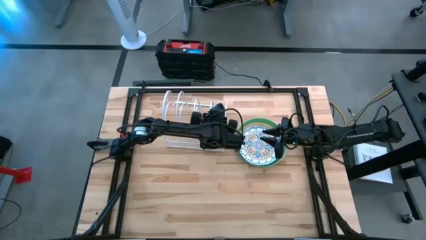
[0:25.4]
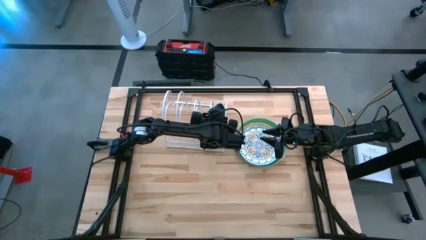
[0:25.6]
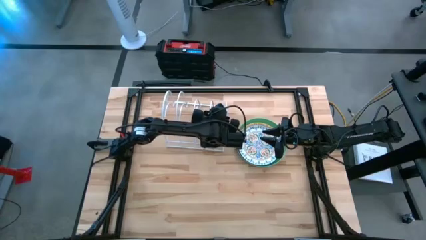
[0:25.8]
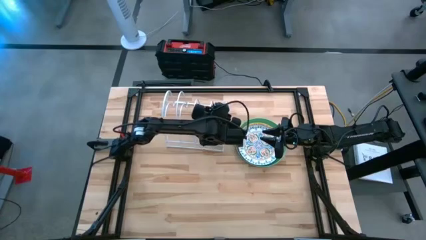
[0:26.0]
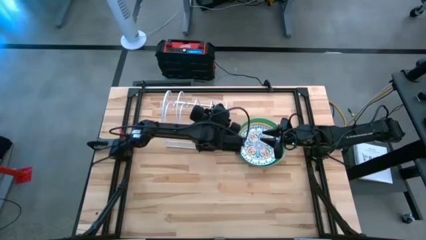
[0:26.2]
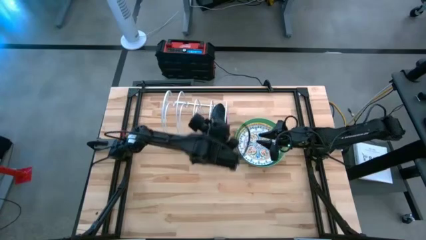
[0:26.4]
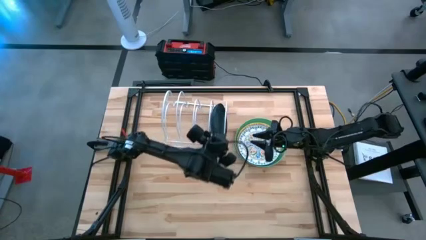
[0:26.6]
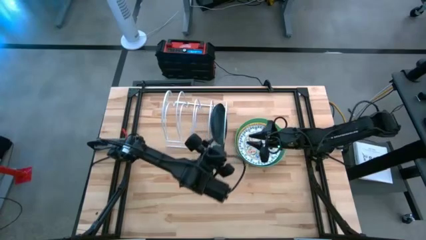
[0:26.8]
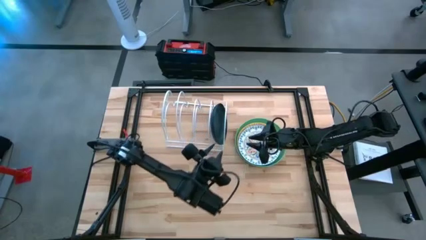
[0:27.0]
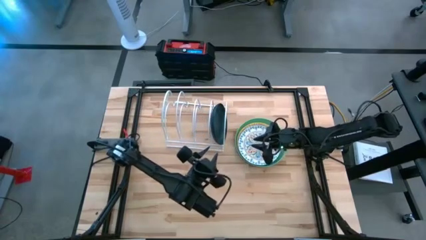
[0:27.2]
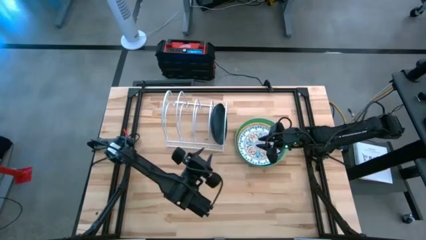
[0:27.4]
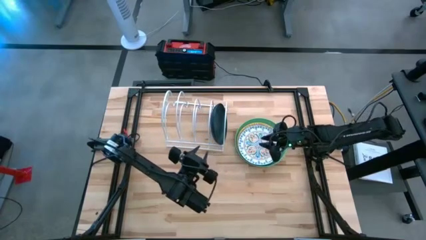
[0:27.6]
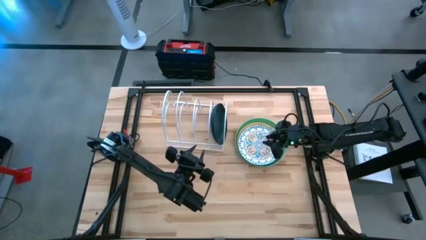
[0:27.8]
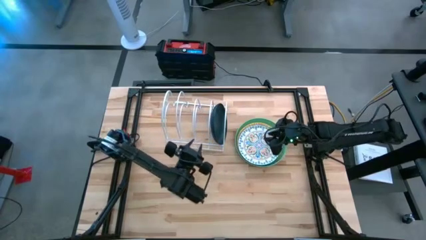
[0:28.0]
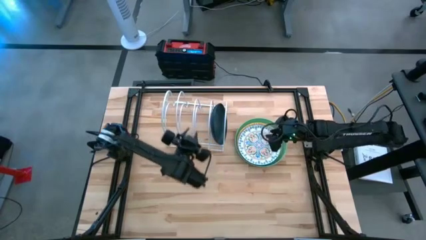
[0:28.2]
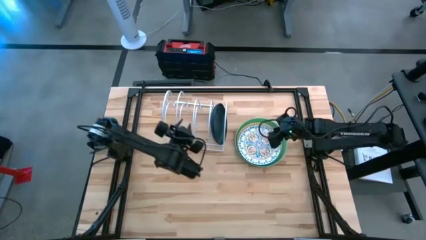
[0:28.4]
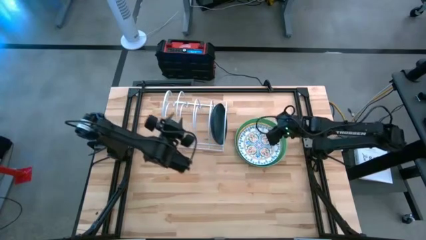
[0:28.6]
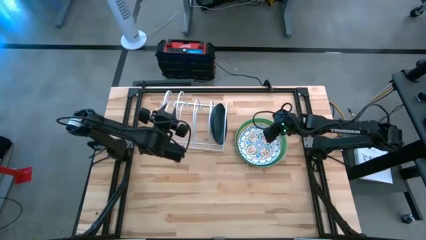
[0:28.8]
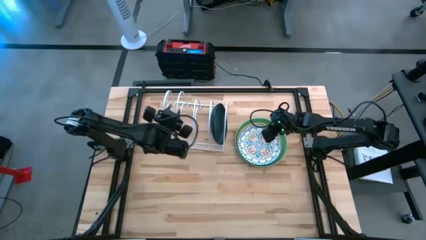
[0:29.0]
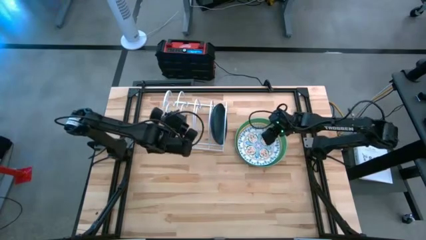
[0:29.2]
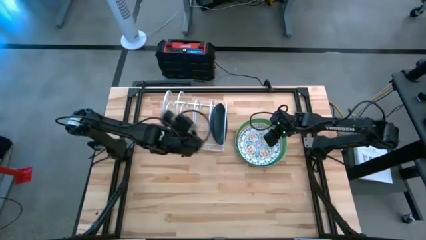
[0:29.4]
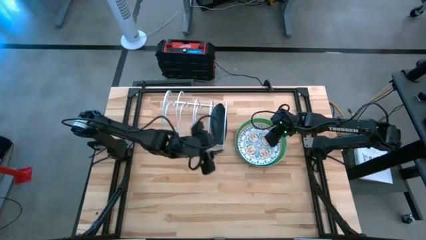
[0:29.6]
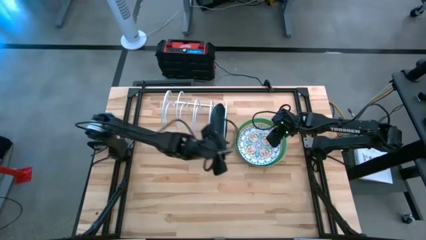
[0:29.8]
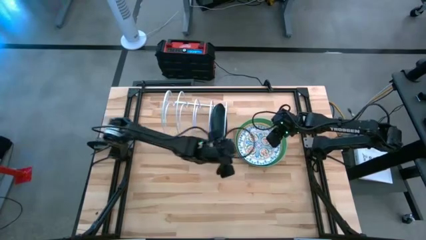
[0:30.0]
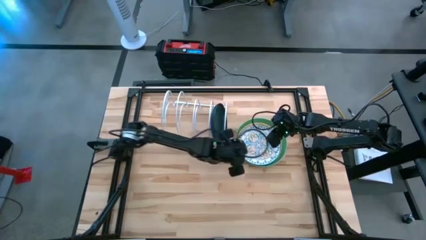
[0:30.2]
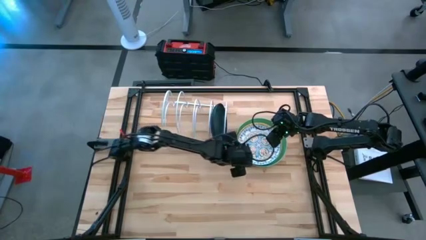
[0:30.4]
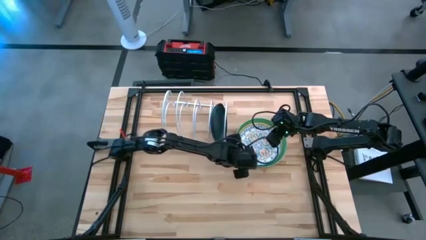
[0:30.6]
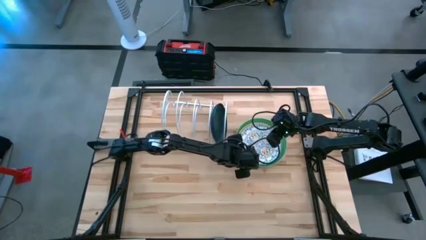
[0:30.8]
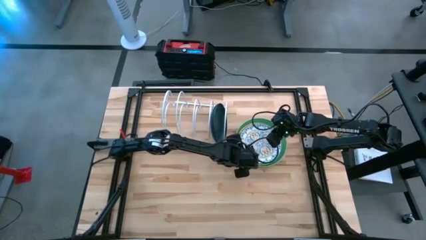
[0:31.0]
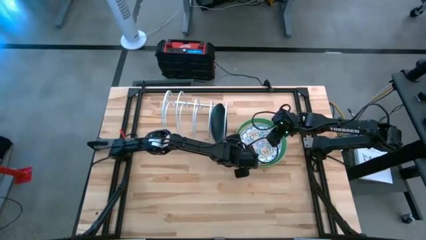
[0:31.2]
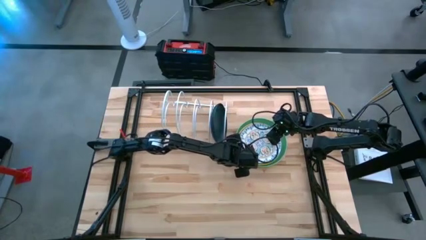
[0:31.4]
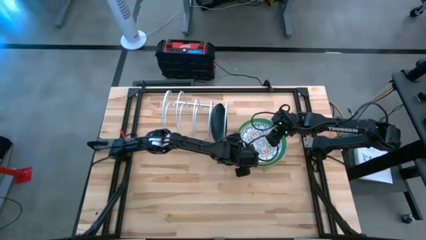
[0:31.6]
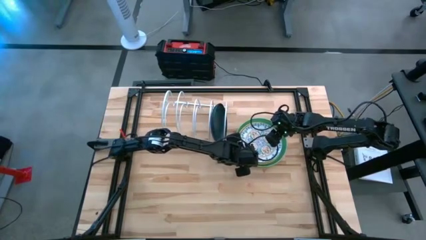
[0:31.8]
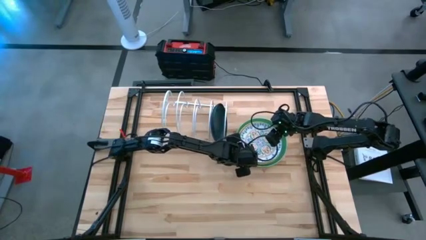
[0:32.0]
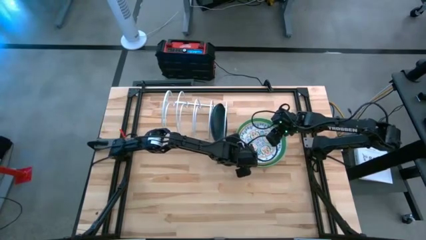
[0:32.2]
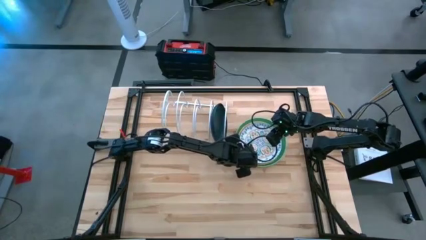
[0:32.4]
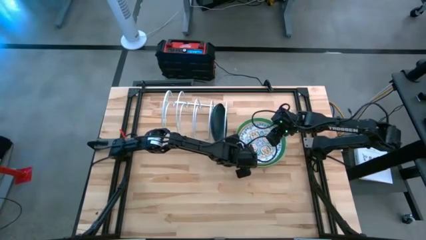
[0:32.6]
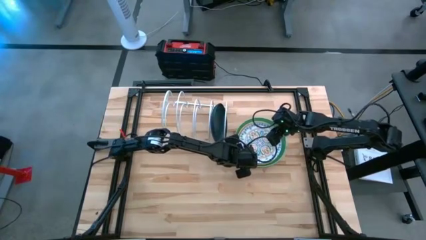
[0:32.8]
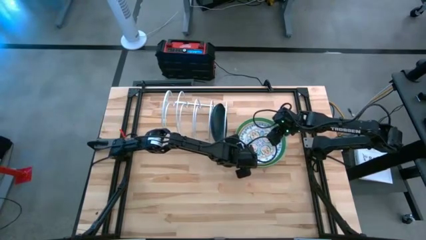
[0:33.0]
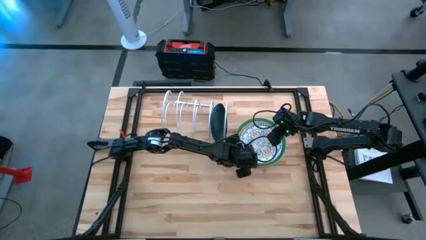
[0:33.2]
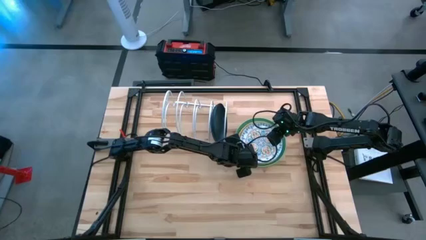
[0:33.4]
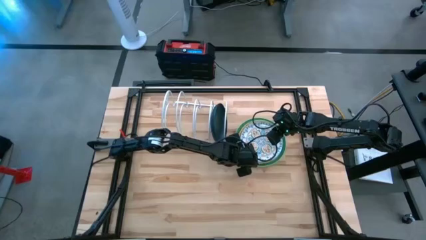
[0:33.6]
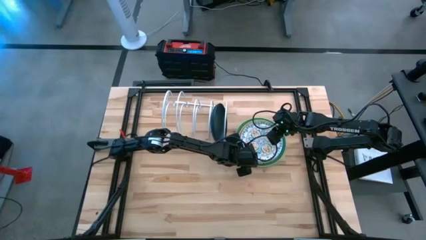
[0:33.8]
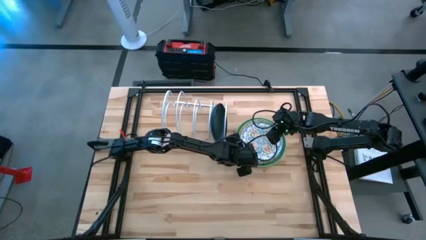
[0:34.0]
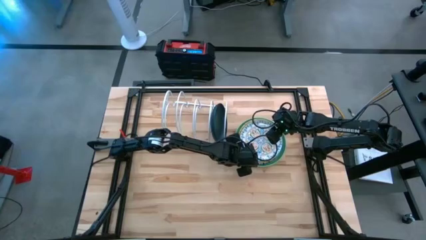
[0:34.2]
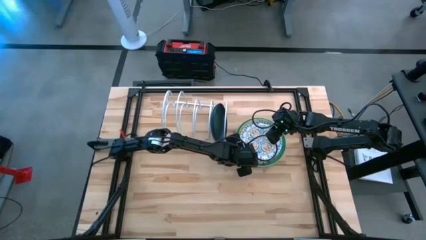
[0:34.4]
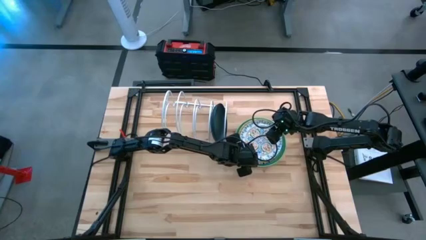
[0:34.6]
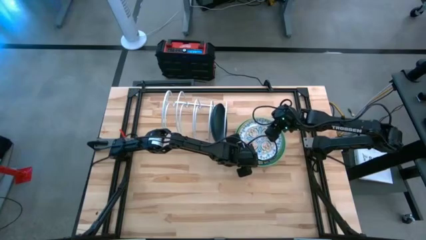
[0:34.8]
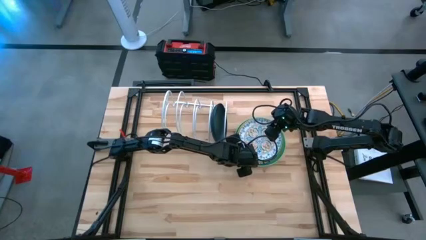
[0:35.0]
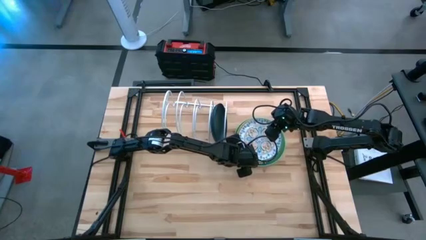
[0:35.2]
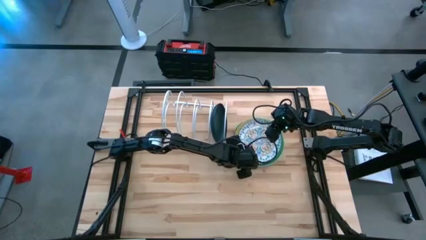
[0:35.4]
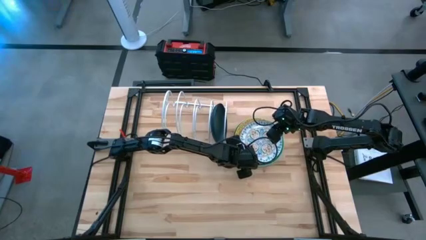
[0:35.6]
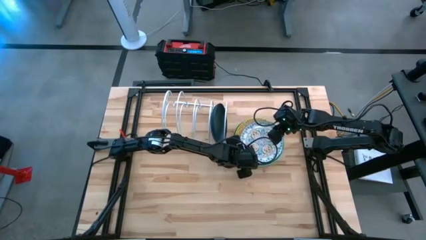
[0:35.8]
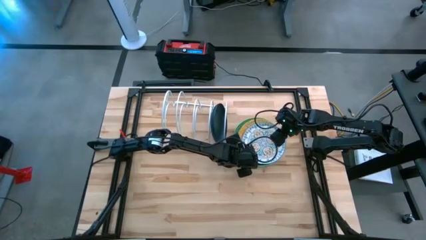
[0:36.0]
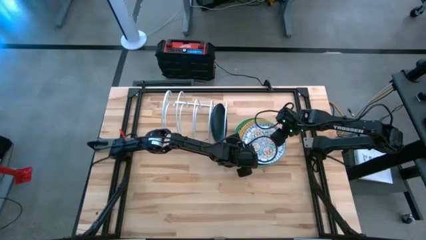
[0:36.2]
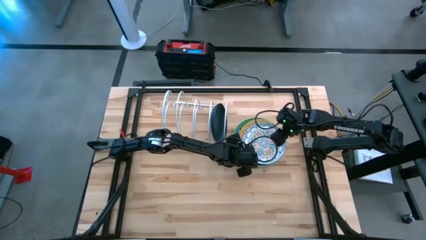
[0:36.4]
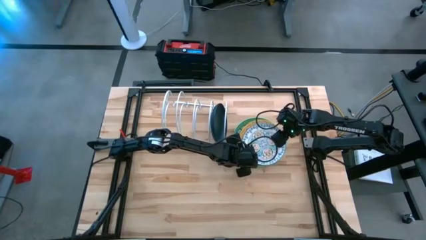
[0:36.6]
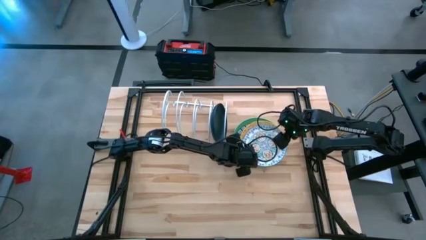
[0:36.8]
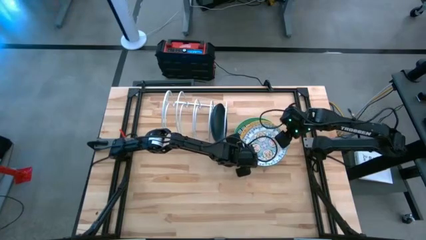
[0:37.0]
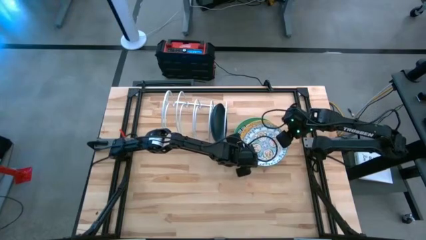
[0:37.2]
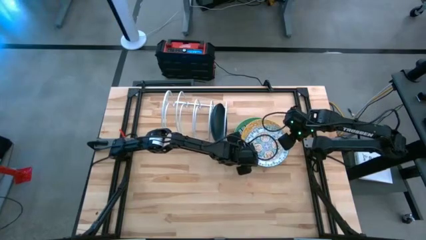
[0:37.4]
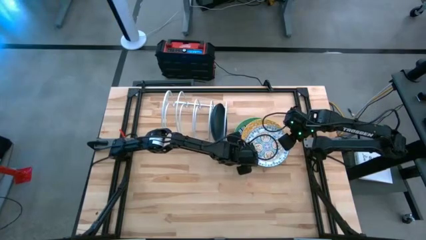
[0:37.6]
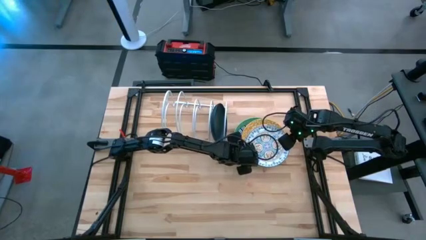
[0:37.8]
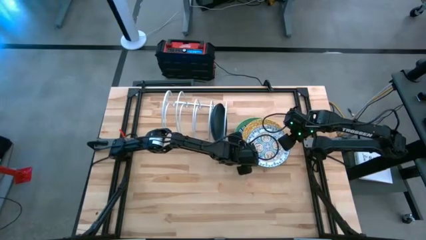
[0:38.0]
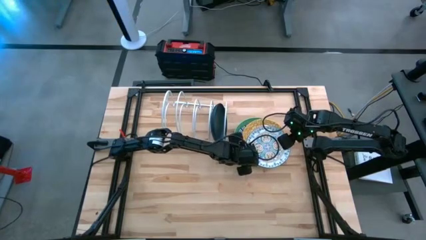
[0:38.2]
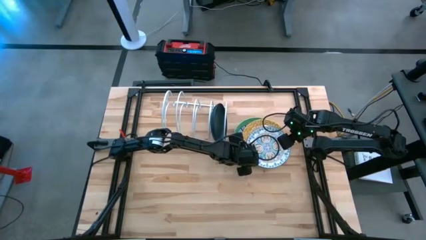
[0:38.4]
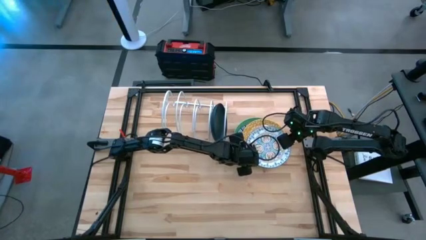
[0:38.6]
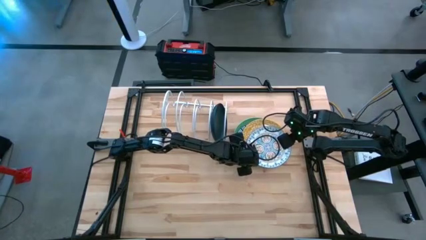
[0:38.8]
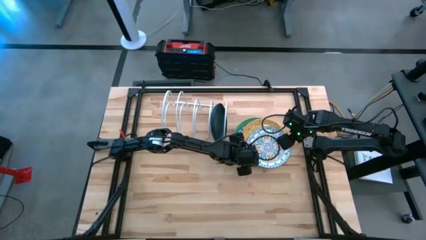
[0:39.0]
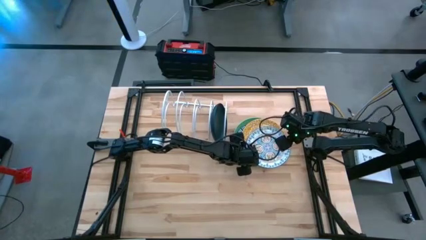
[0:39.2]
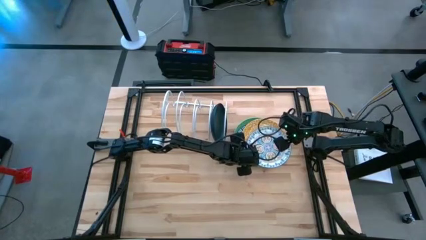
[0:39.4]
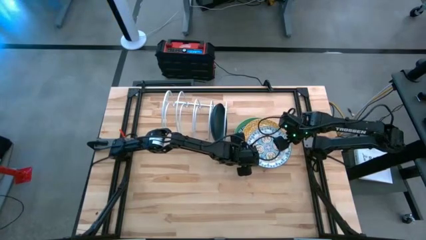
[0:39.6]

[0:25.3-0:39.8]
Task: Sort dishes
Put the white plate in the dish rack
